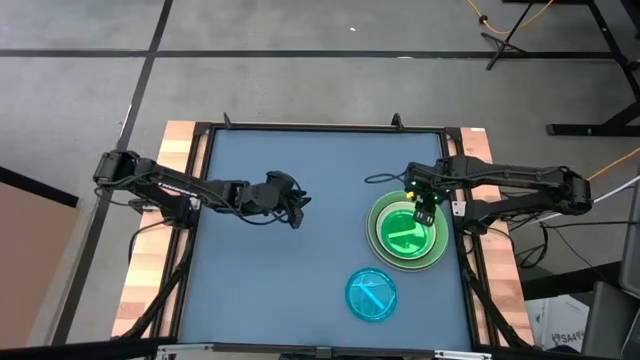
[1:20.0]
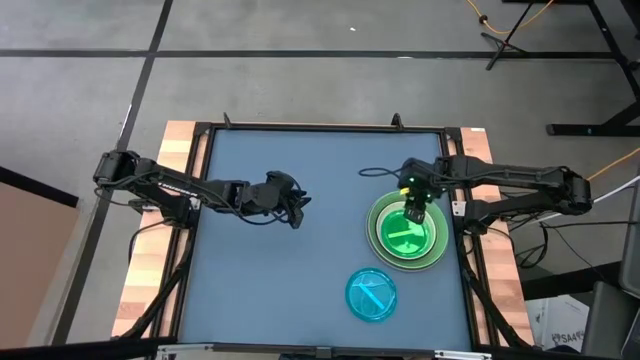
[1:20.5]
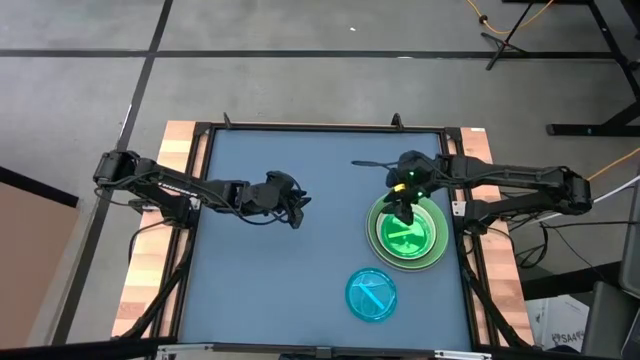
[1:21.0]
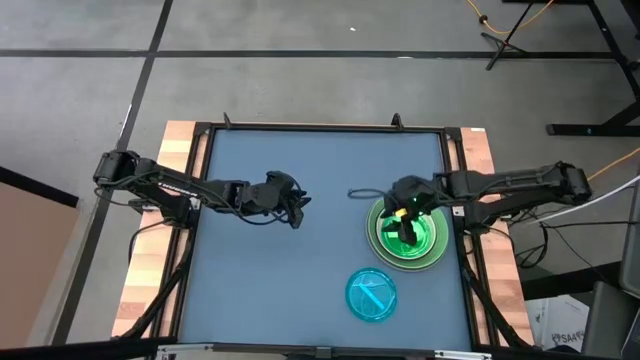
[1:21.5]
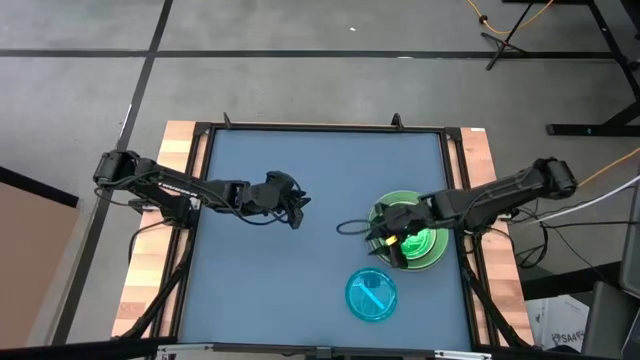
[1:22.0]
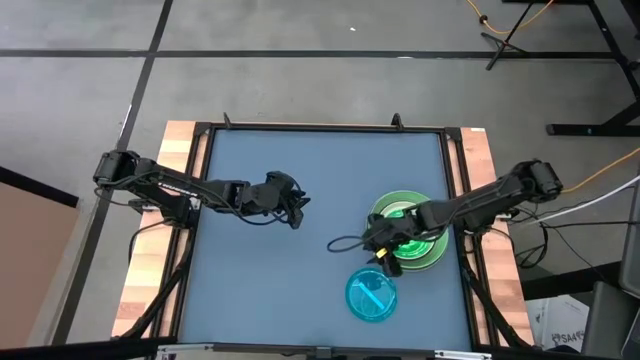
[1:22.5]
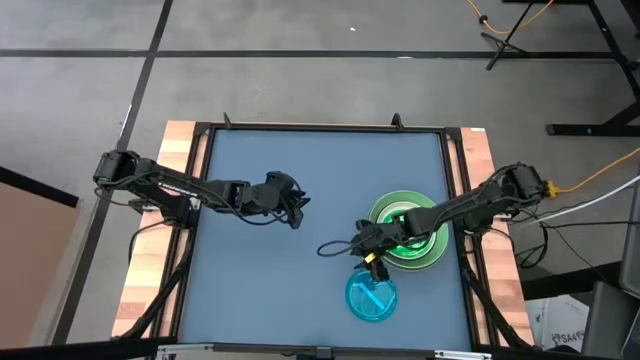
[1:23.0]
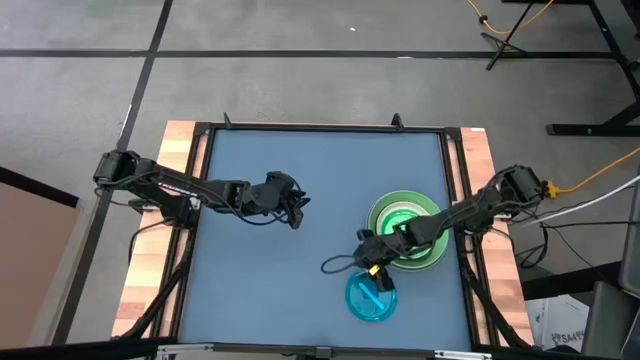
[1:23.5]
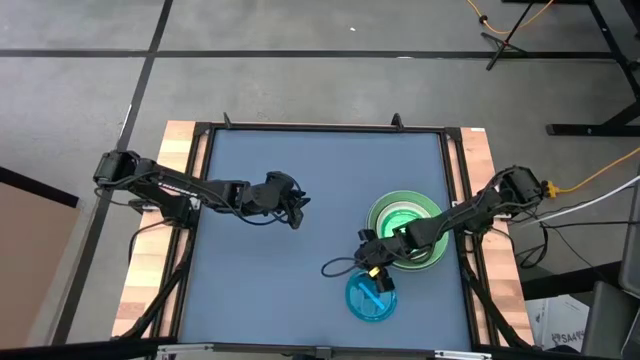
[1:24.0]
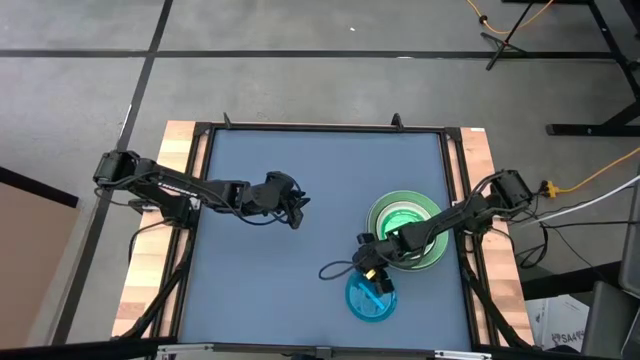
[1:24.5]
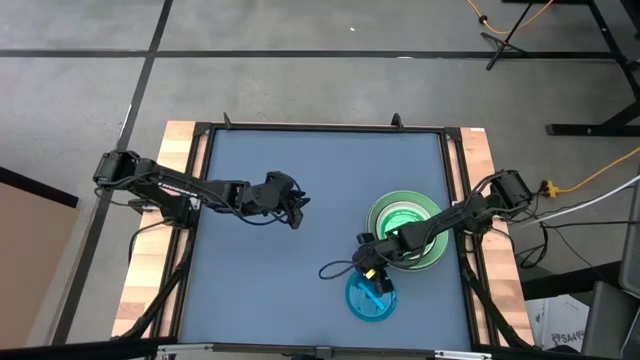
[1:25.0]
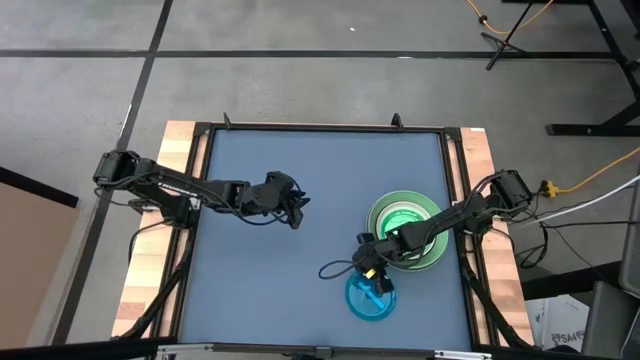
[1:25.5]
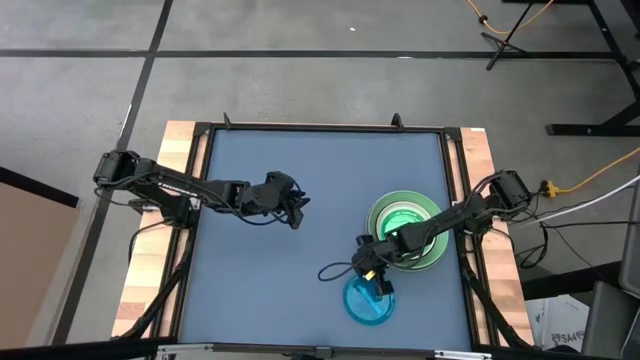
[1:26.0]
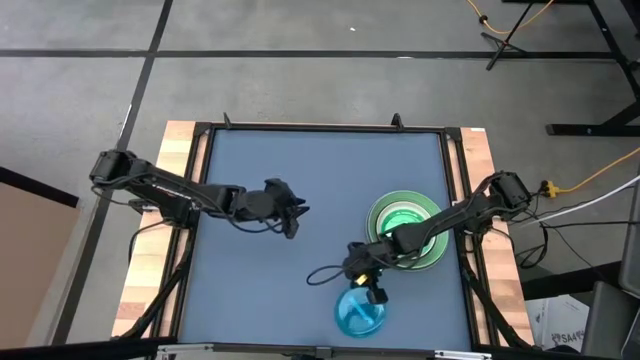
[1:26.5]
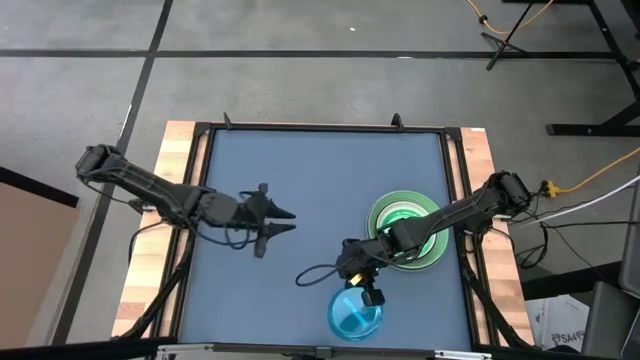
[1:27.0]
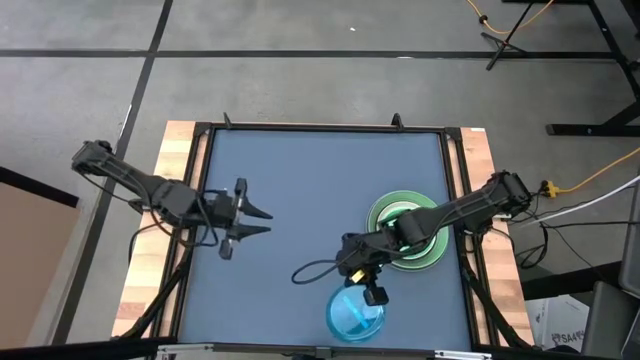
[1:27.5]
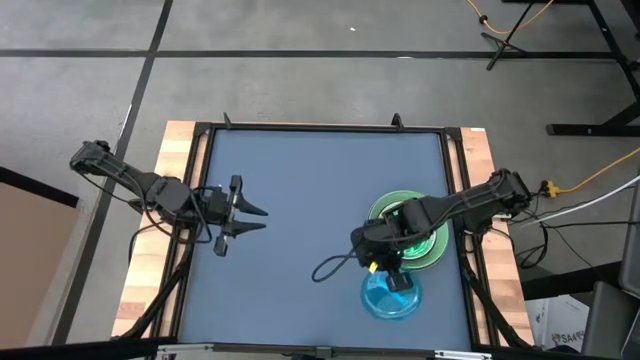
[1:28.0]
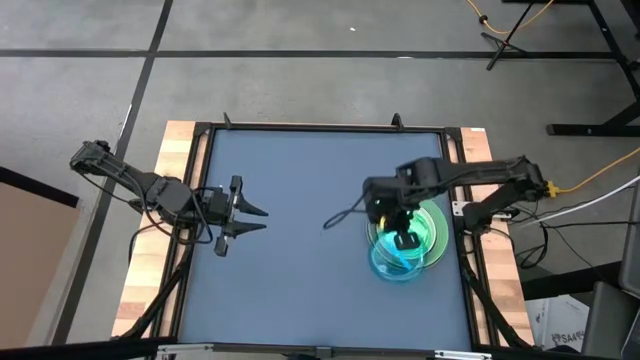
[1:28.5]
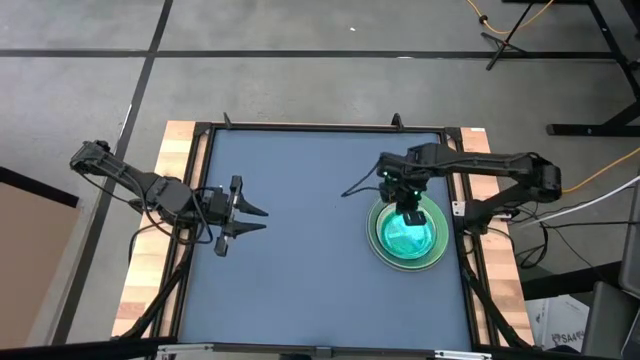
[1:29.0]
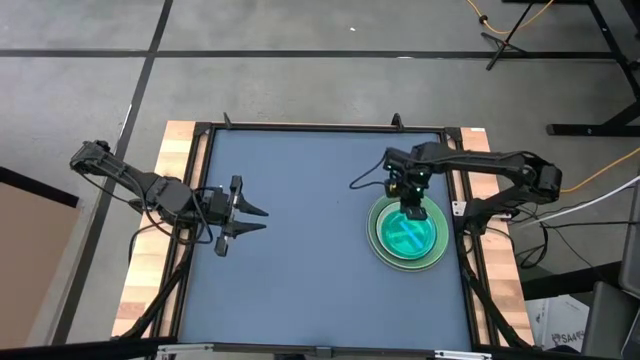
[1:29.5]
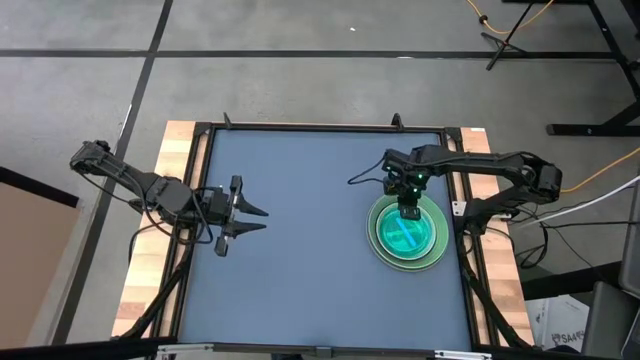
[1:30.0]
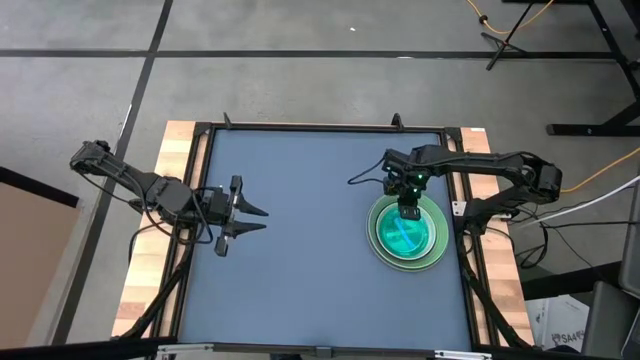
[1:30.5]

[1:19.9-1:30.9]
Task: Stack plastic plates
Stack the blue plate on top of the green plate

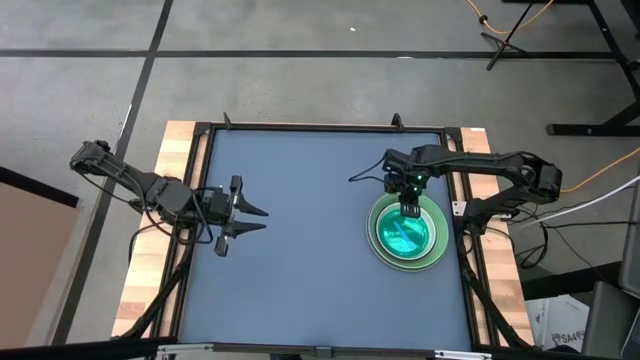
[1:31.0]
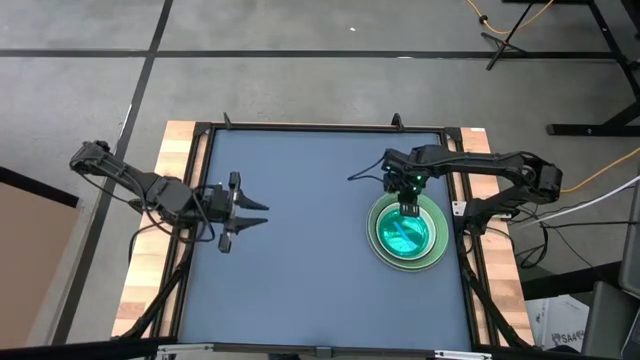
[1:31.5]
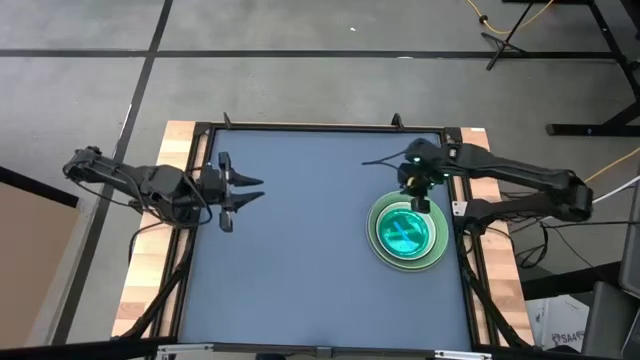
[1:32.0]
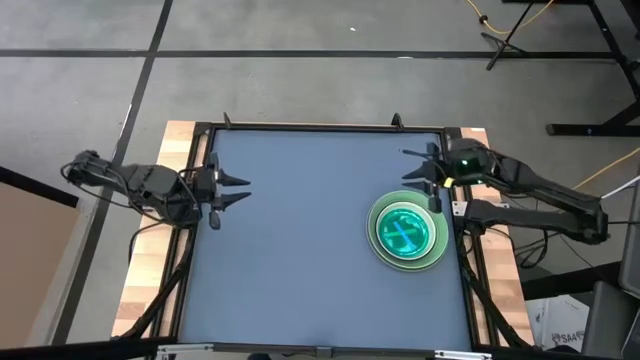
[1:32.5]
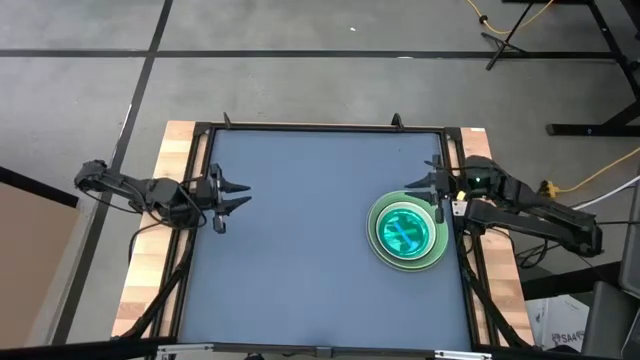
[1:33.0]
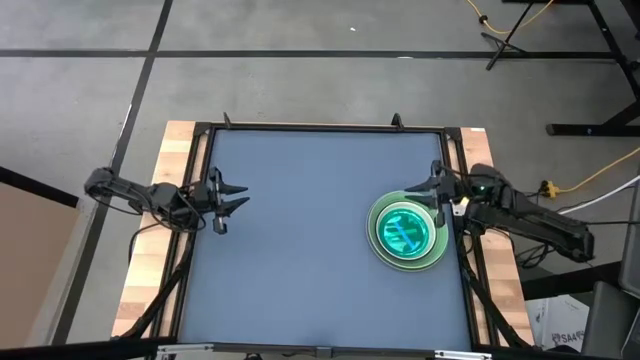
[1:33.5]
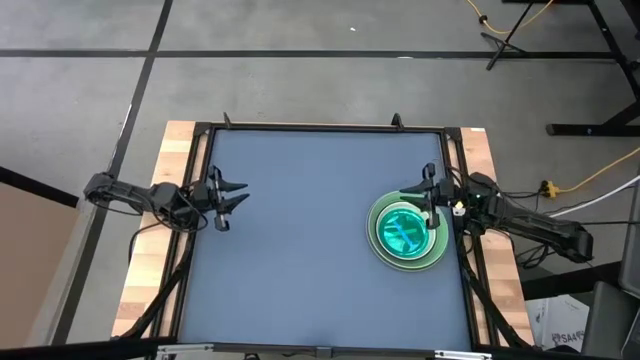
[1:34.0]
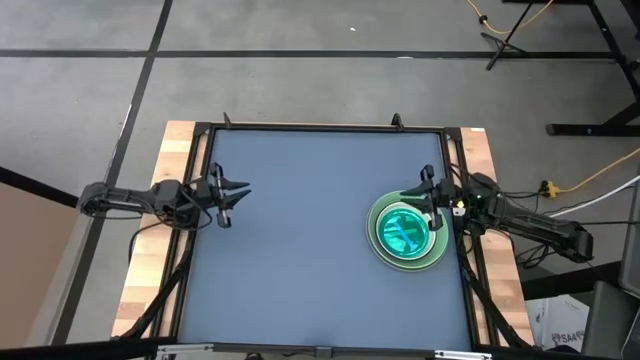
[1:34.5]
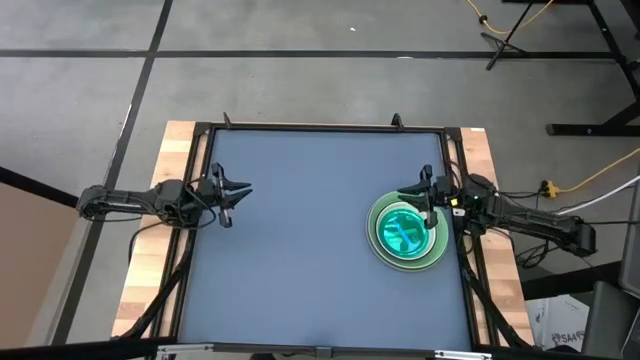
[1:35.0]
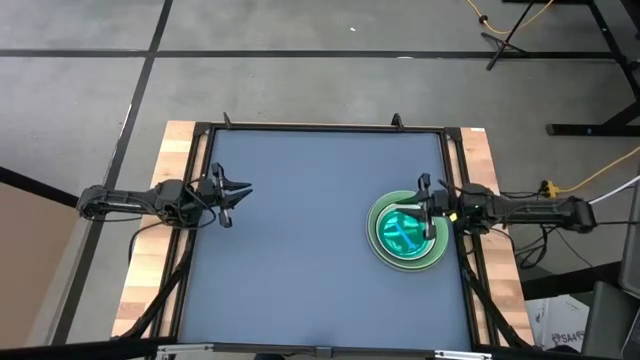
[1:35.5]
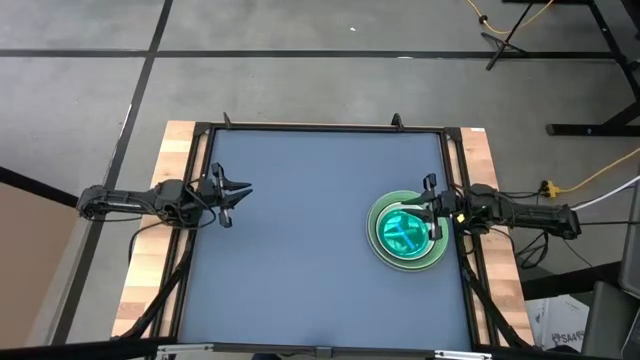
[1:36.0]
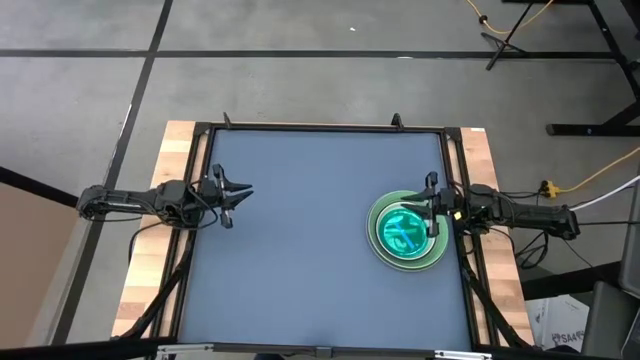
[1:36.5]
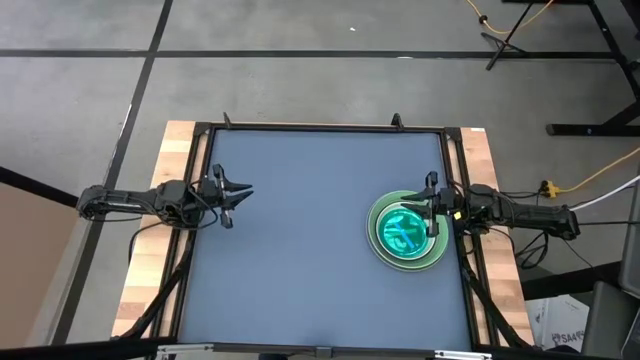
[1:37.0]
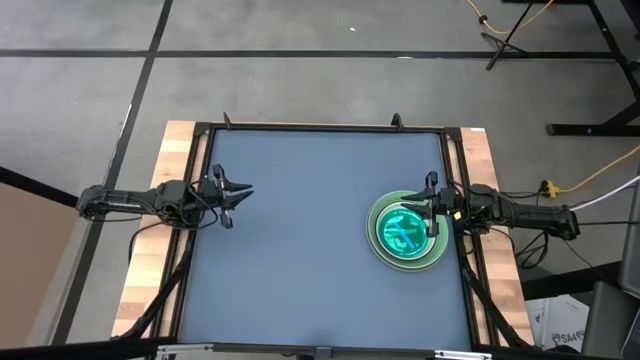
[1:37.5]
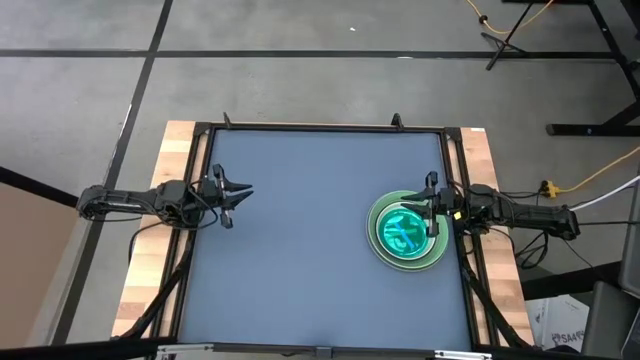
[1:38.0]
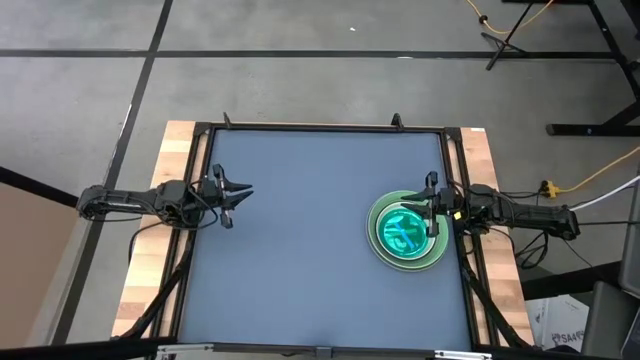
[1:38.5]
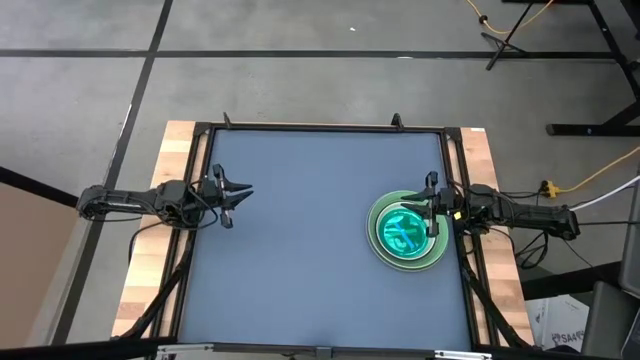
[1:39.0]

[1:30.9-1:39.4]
Return to Home Position

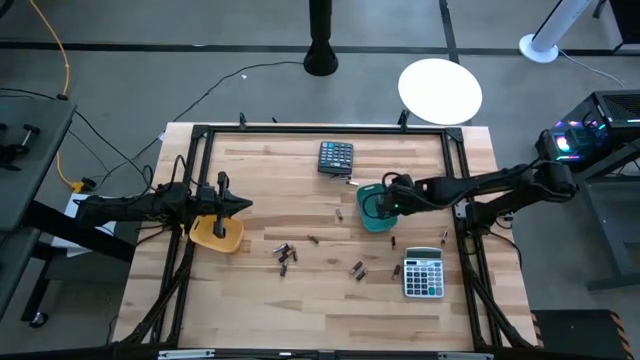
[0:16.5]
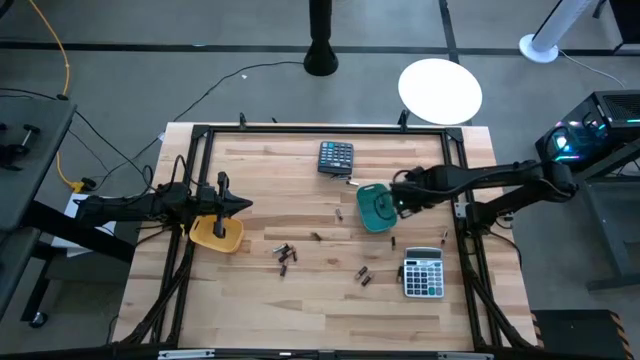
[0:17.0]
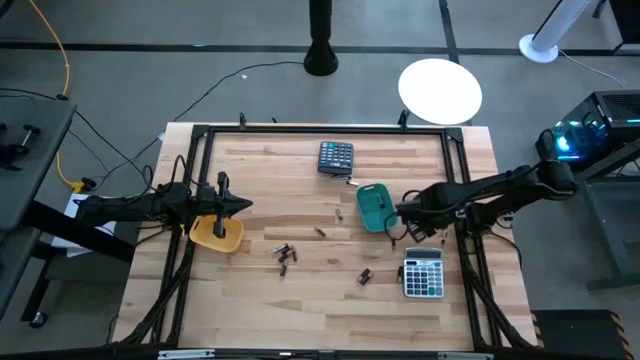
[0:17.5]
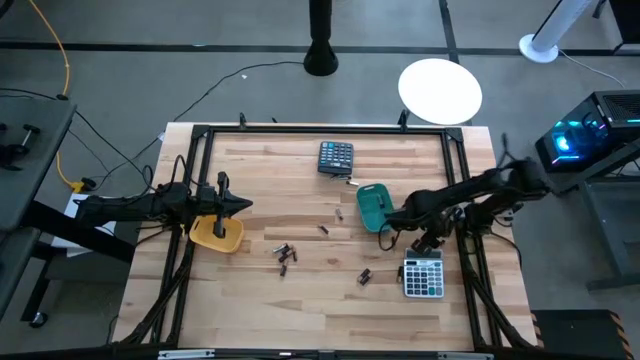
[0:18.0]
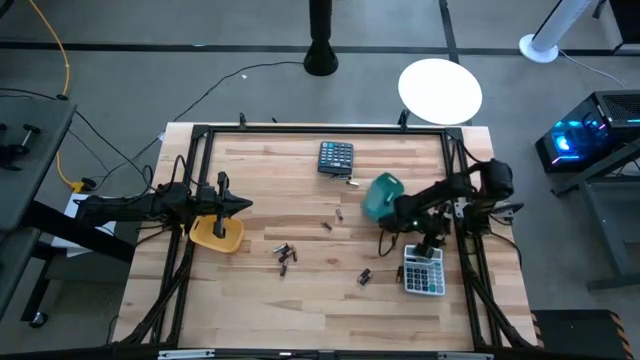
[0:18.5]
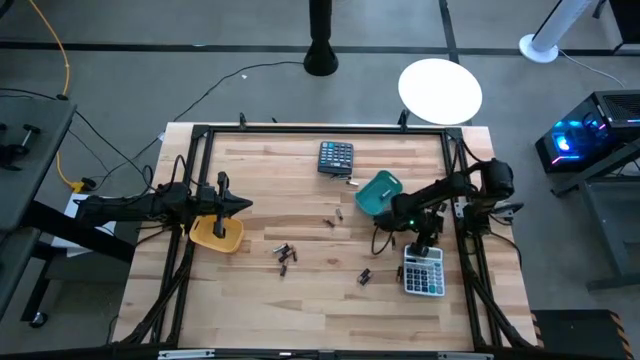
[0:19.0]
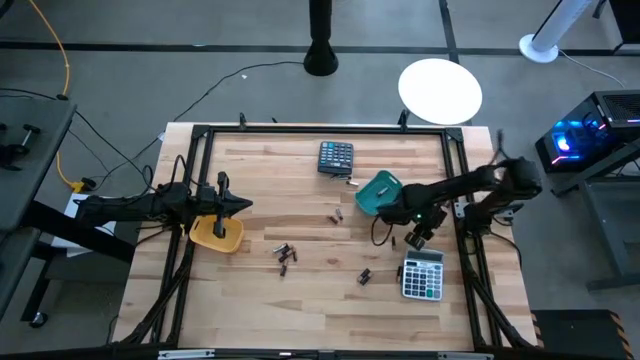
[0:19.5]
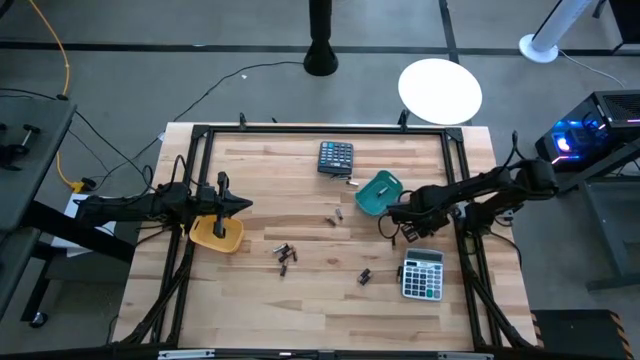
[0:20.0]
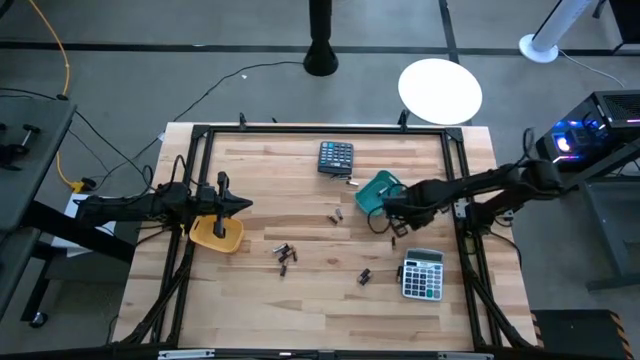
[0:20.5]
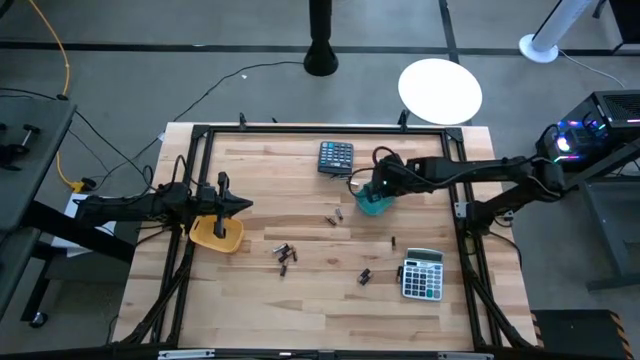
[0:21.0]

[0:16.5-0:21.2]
Task: Sort batteries
Put the silver battery into the green bin
